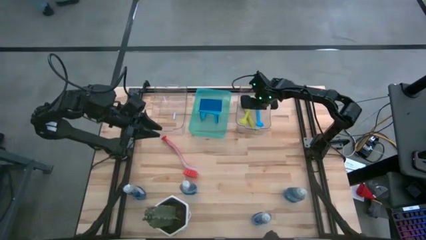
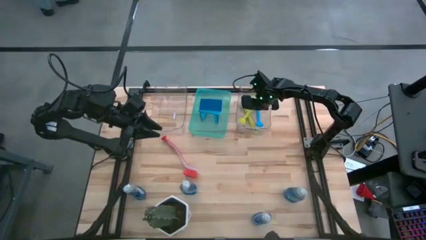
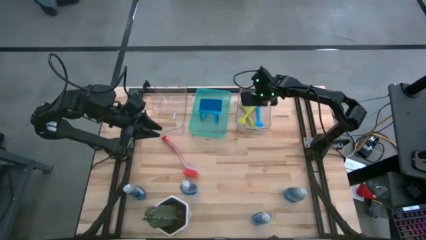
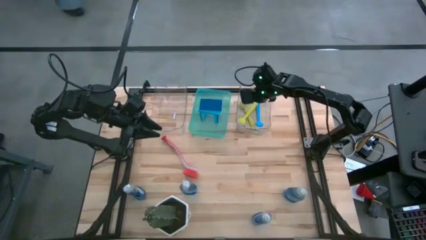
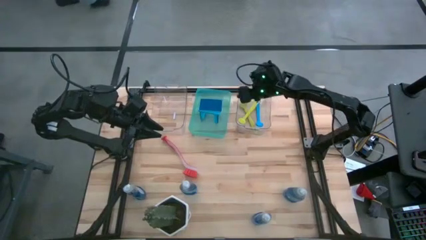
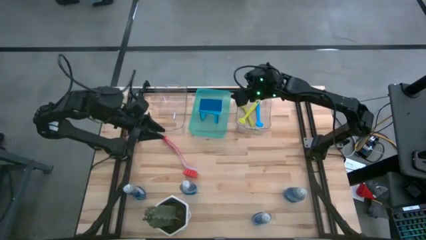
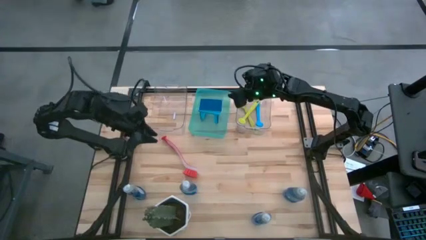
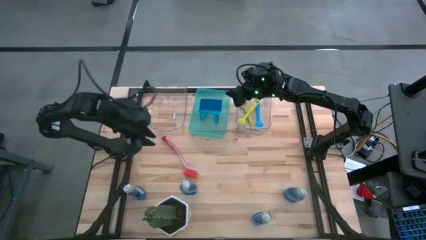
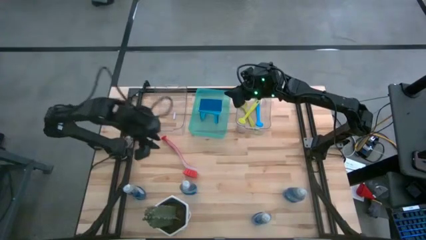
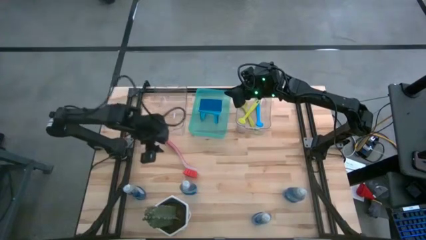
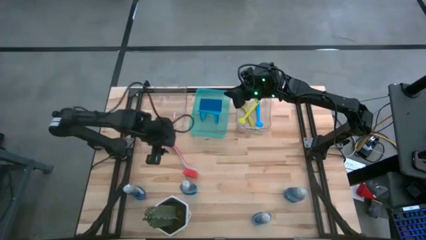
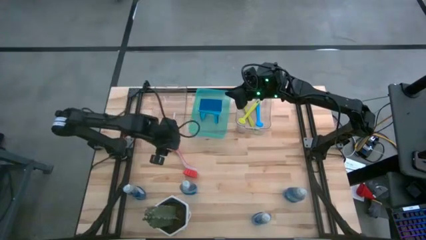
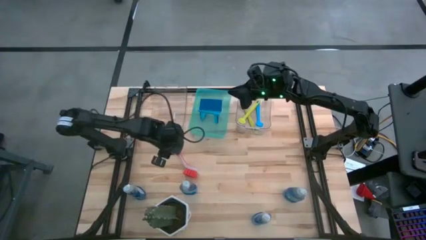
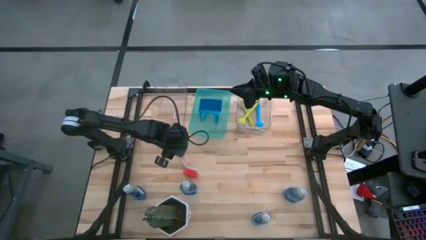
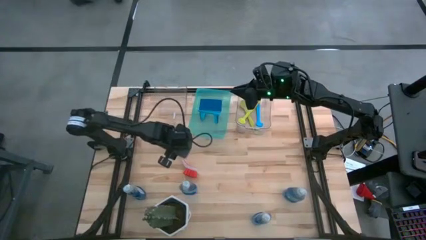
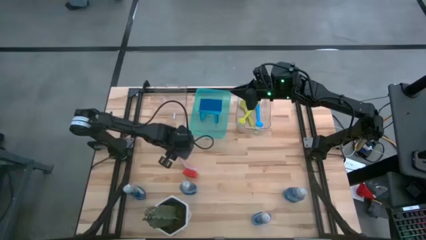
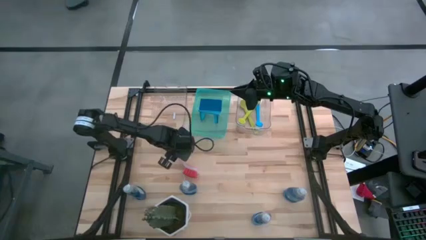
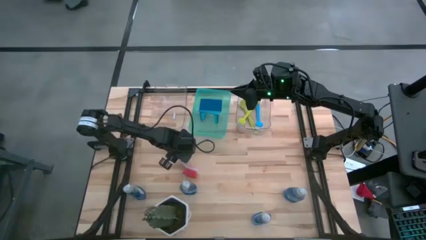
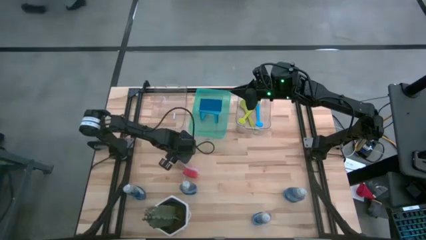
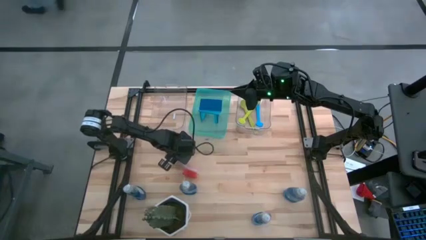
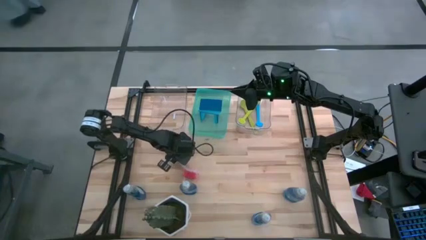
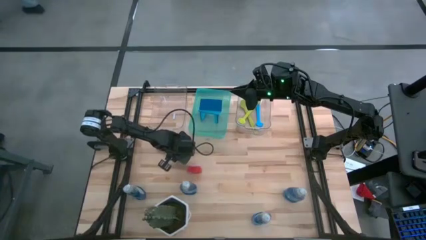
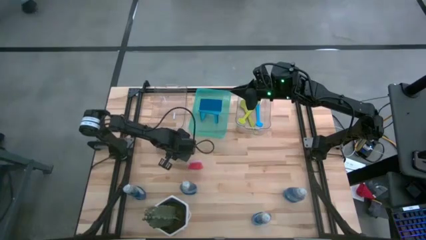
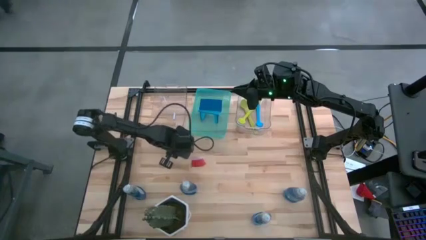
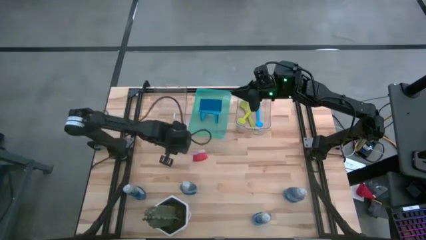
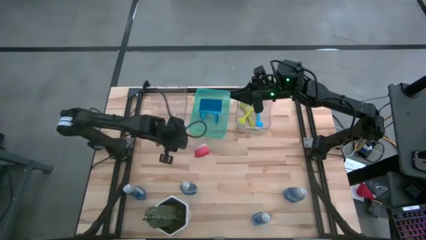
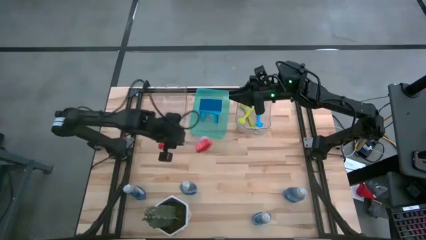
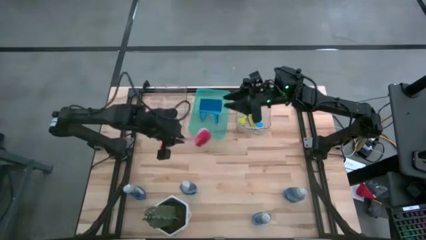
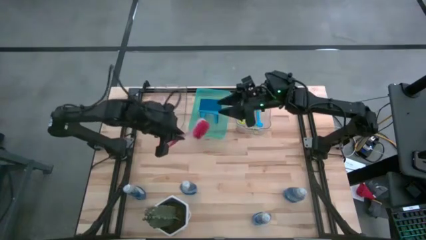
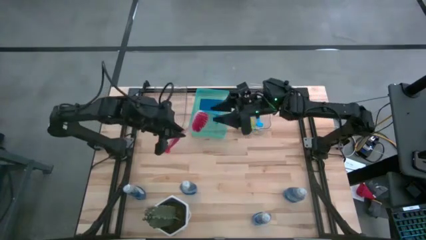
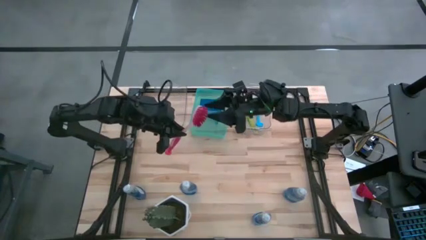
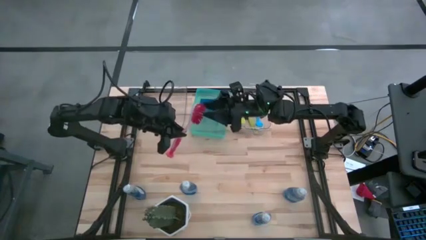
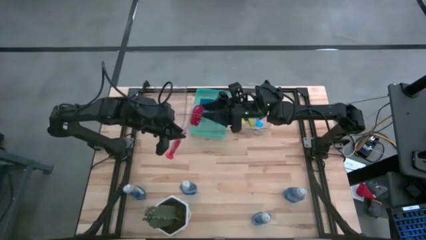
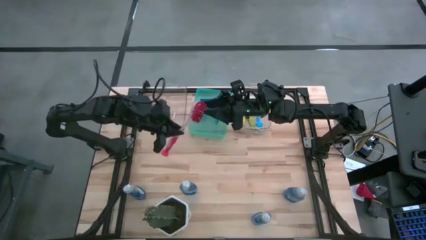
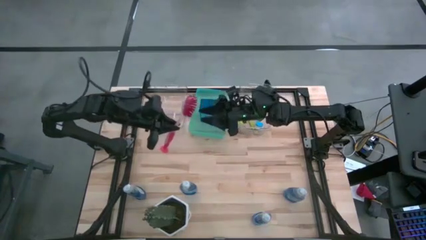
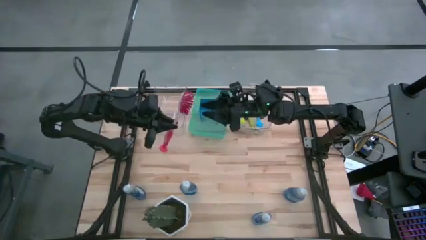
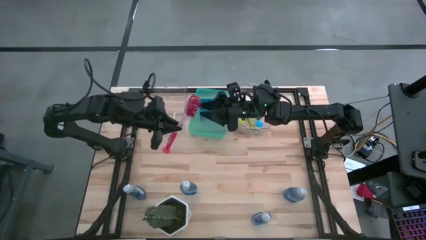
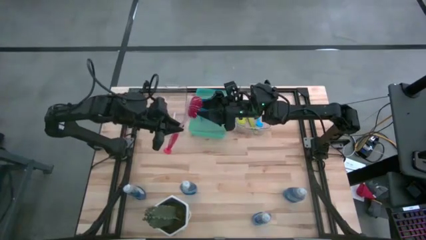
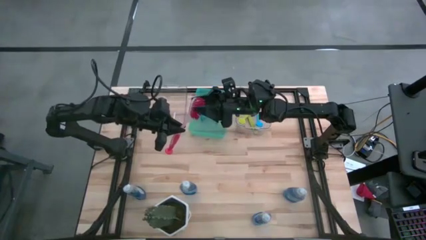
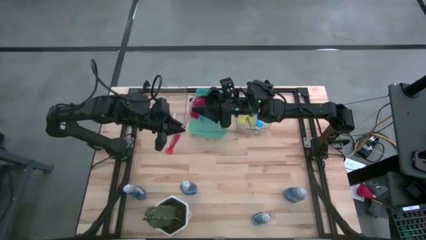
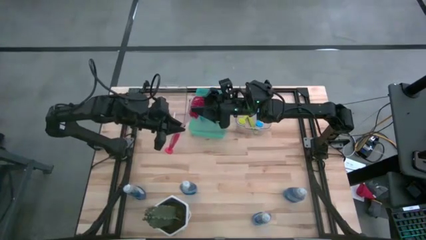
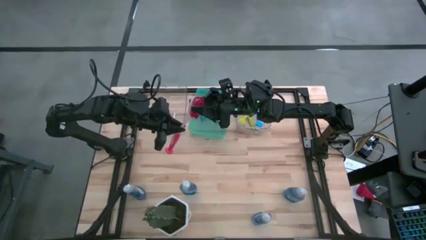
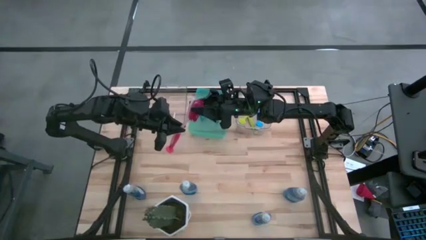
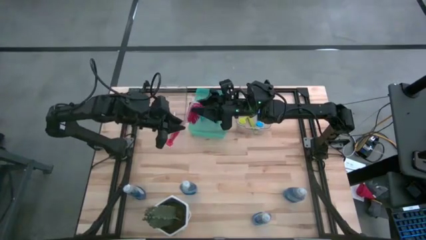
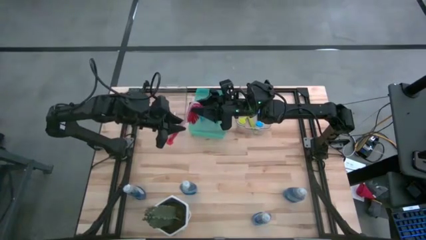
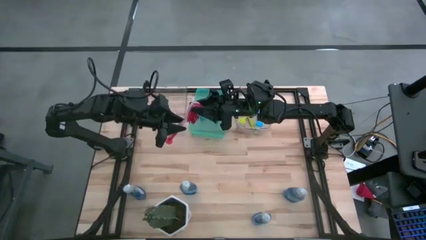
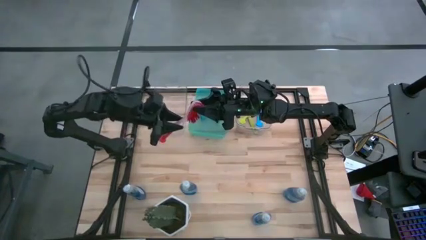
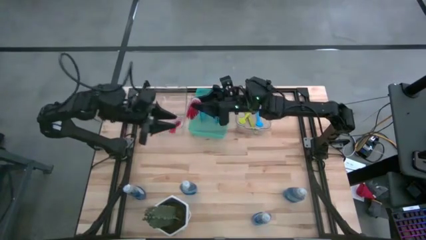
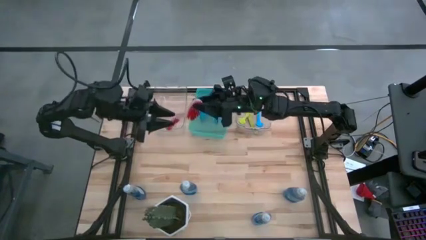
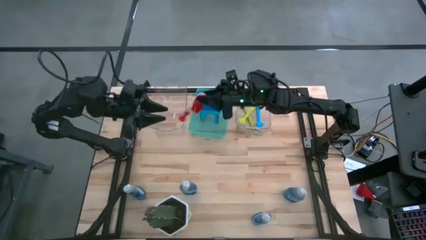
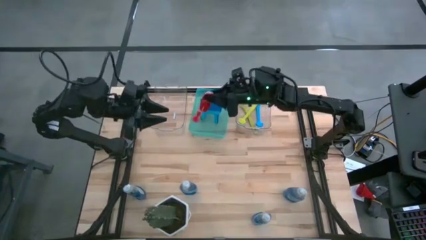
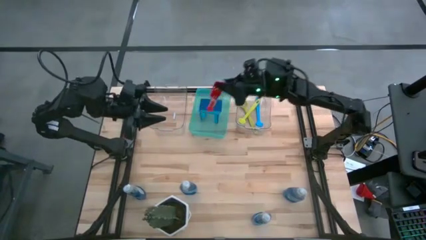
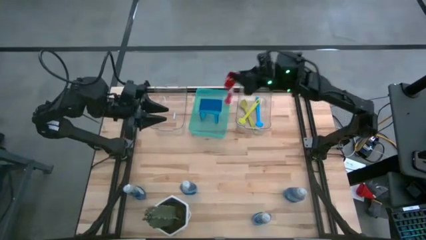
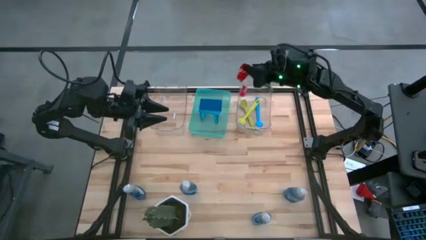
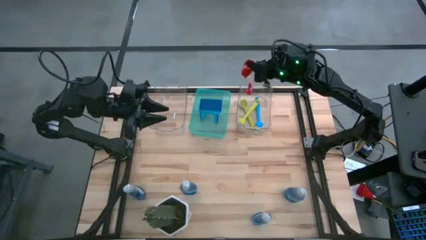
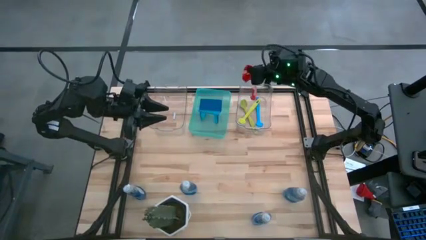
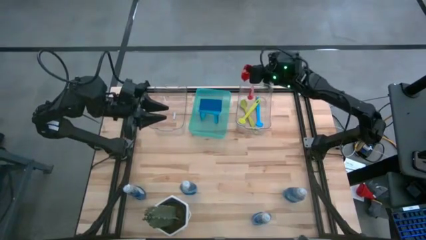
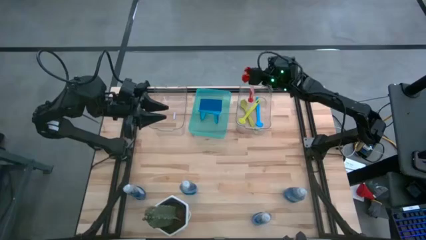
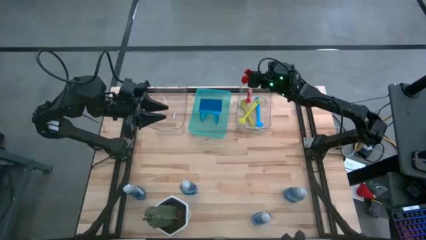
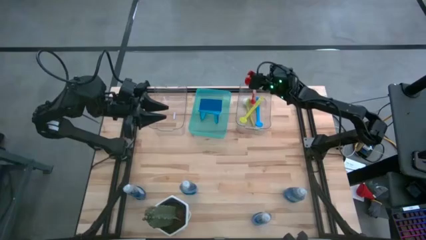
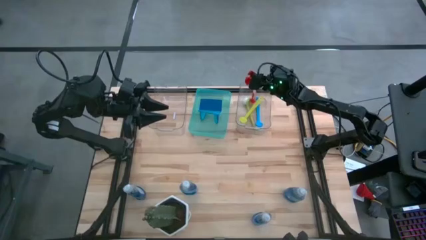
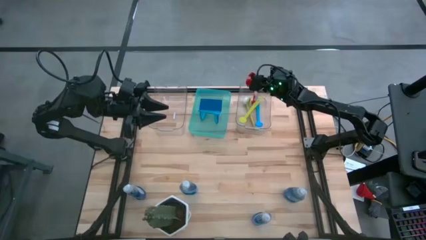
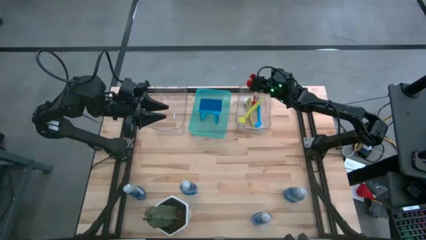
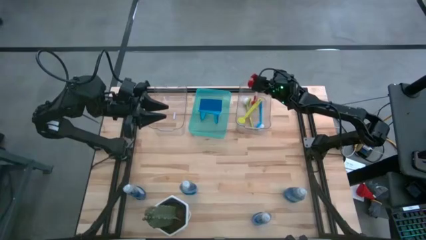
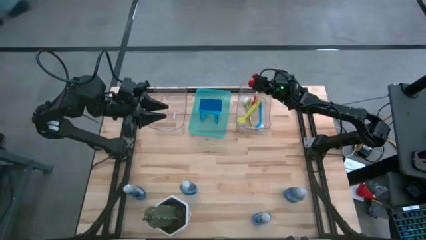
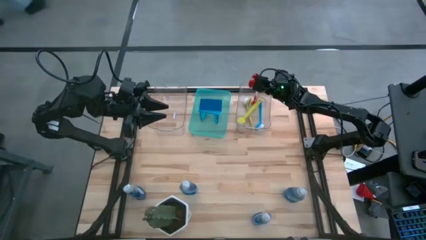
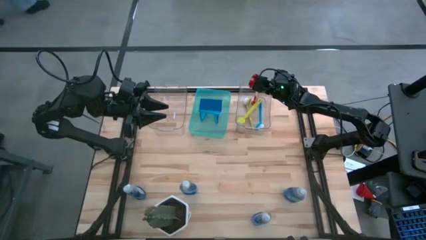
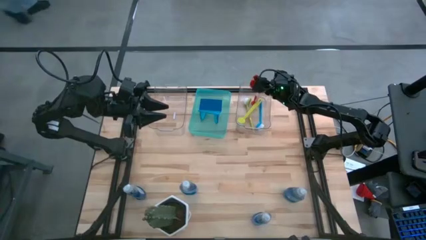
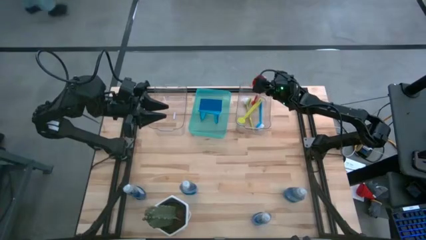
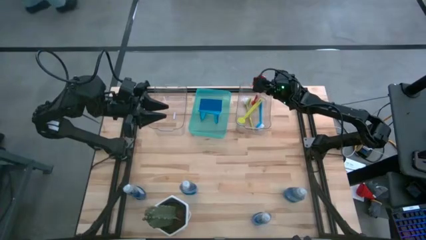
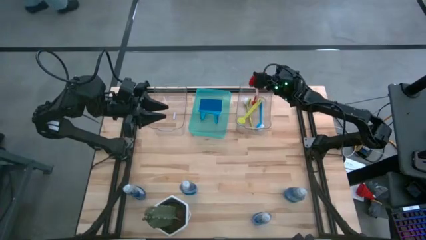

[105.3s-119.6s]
Task: Pick & Place Kitchen Sink Supplies
Put the red dish brush into the right transparent bin
